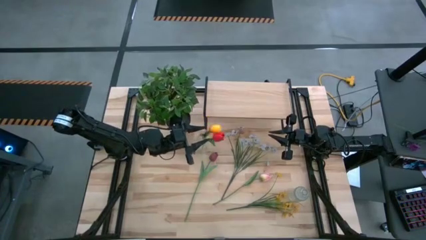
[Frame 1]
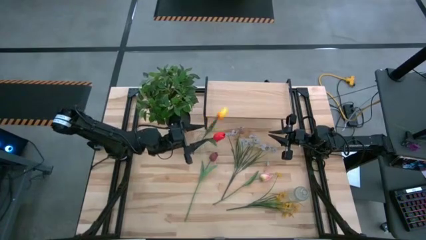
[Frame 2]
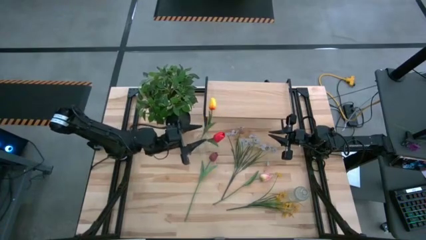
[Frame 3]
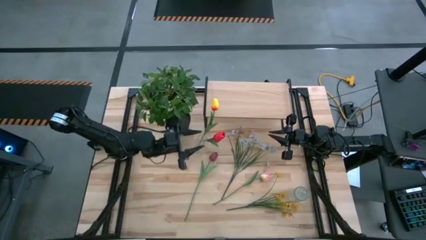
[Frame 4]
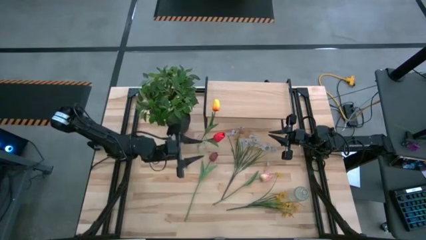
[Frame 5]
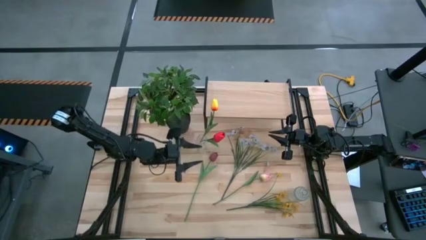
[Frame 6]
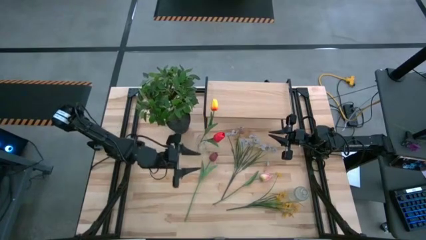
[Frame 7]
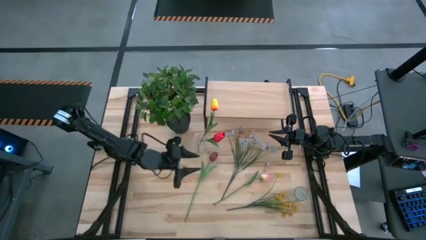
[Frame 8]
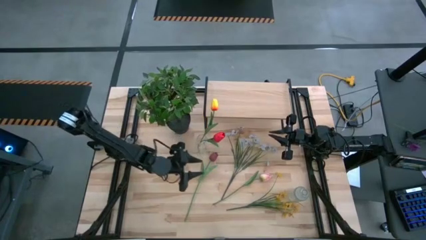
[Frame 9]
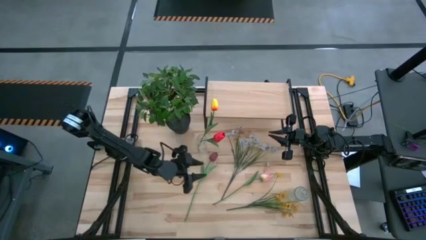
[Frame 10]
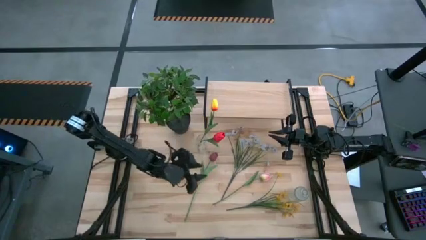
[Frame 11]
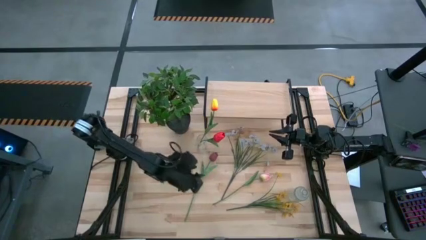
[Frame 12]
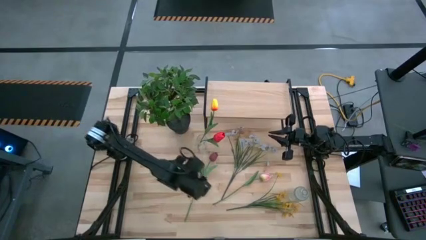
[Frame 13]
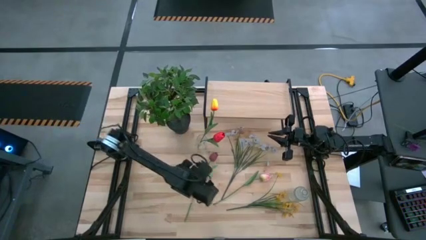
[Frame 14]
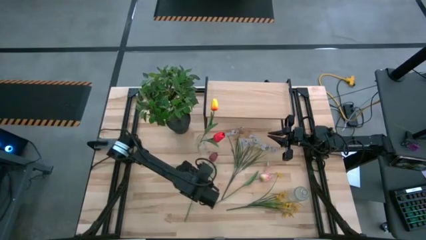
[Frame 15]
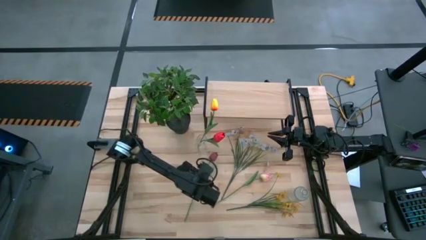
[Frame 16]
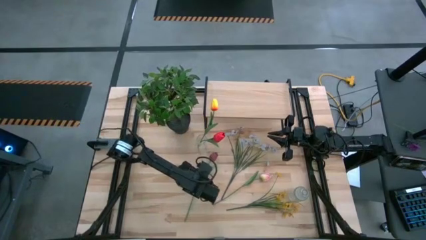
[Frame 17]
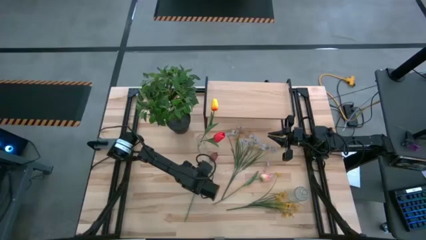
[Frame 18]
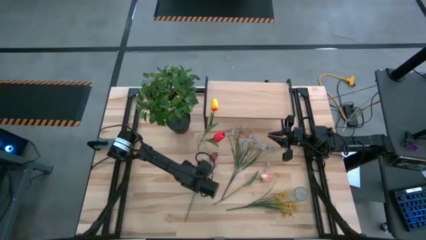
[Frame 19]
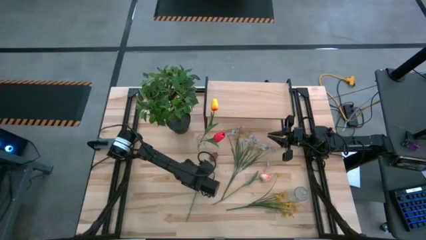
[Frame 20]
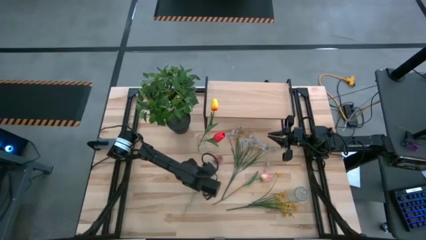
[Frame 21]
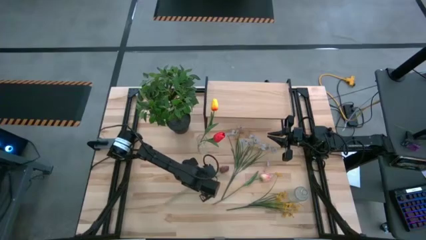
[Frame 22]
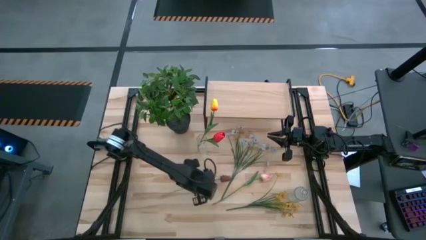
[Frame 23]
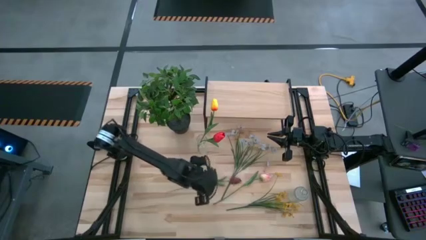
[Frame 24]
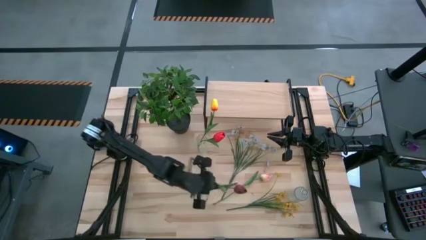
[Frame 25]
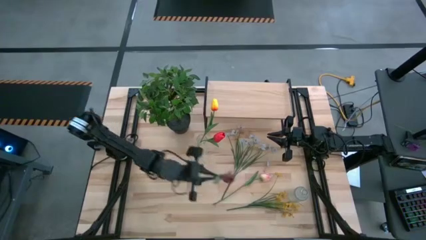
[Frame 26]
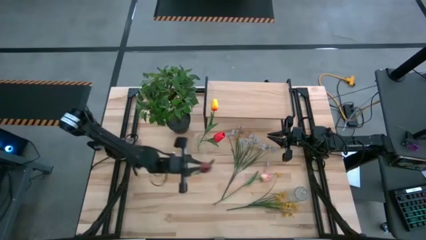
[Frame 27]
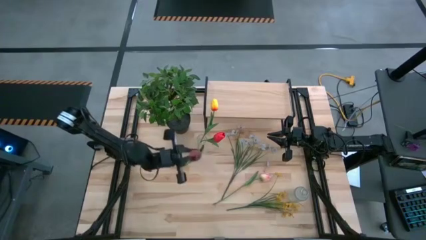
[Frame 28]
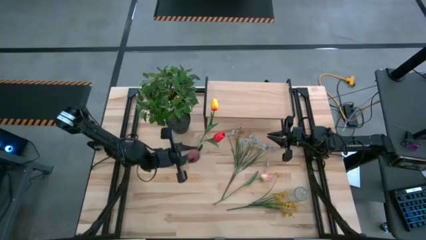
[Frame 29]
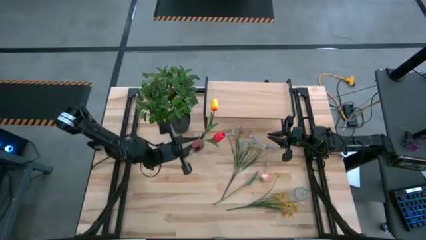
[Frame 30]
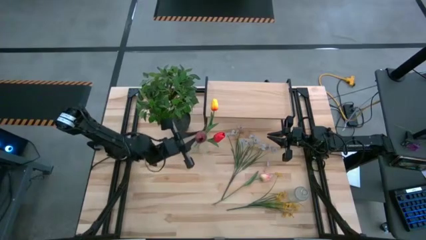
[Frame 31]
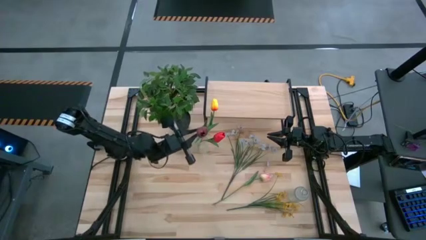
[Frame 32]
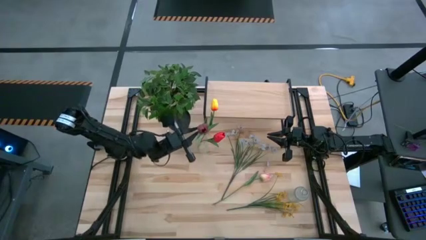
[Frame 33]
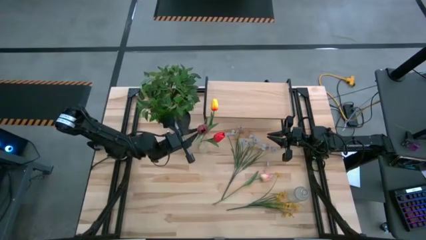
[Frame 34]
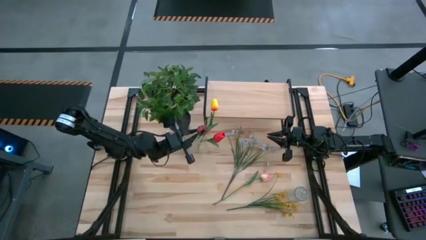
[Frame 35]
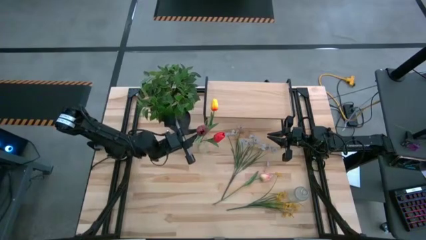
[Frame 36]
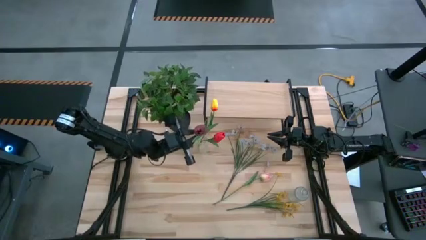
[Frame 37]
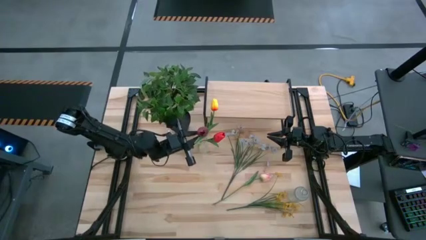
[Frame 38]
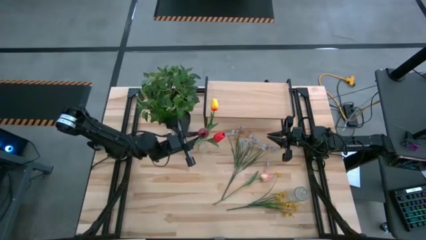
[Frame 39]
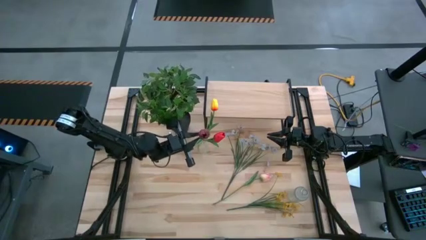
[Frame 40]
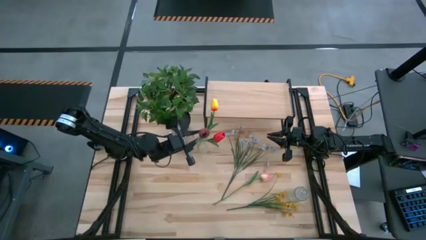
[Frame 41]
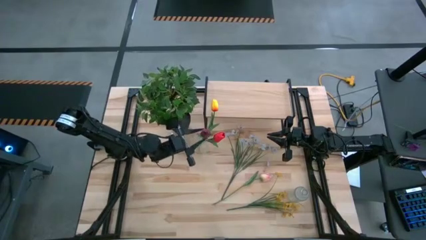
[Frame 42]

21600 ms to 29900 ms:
Task: Pick and place flowers into a vace then onto a shelf
Put the dark red flower into the top transparent vase

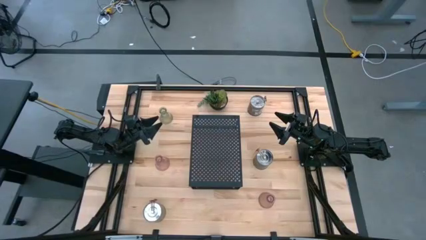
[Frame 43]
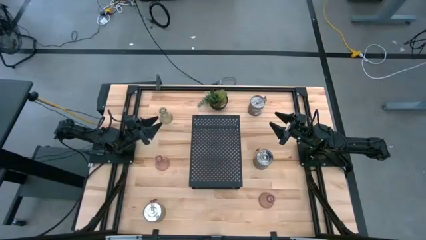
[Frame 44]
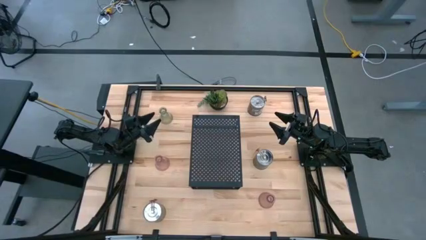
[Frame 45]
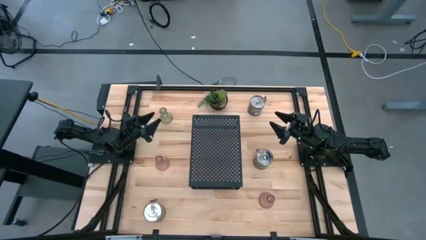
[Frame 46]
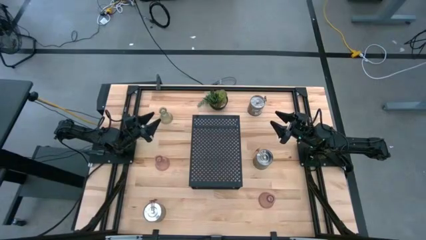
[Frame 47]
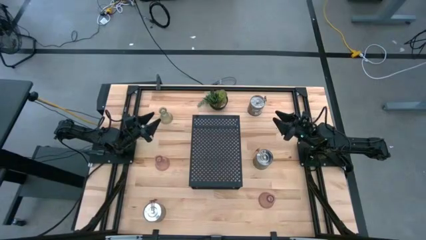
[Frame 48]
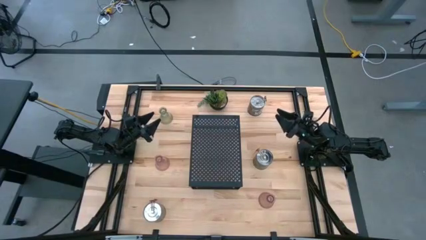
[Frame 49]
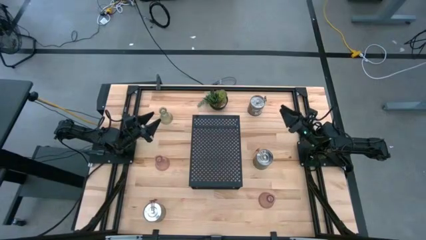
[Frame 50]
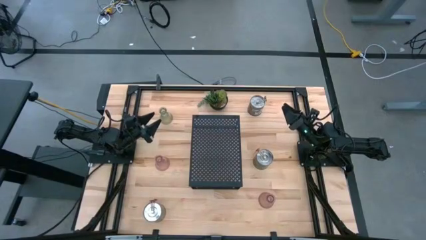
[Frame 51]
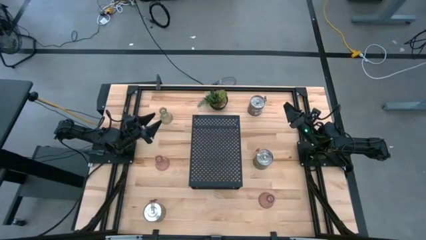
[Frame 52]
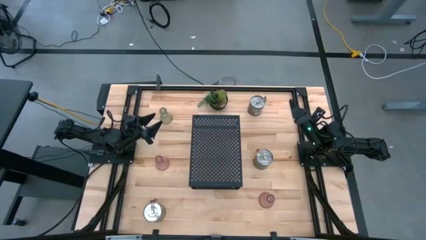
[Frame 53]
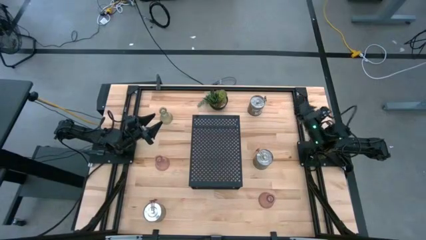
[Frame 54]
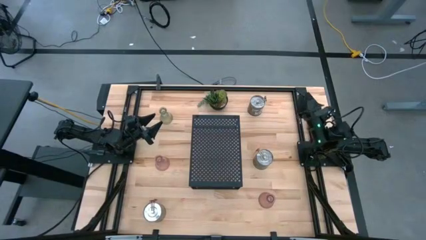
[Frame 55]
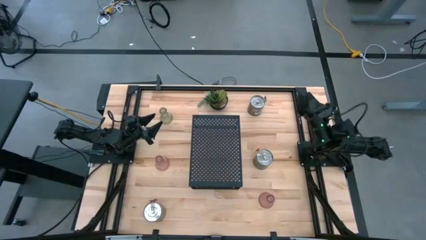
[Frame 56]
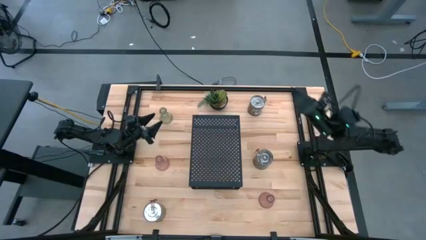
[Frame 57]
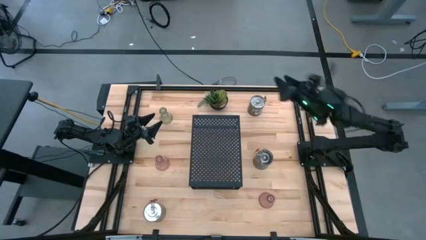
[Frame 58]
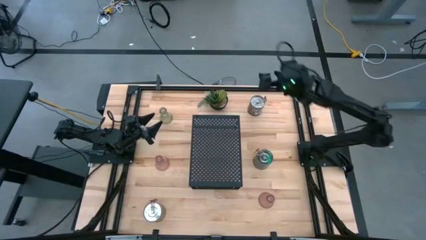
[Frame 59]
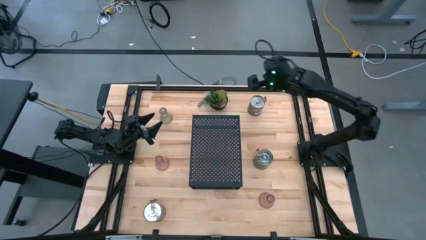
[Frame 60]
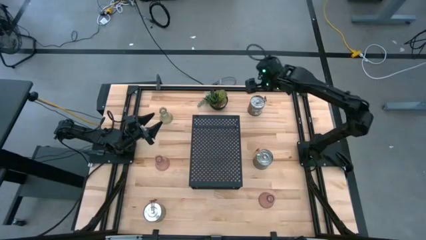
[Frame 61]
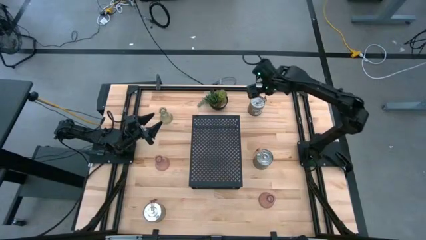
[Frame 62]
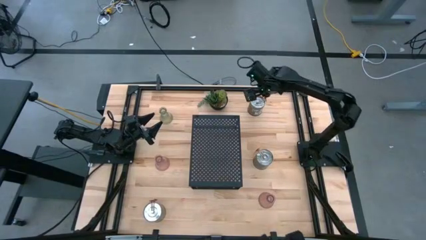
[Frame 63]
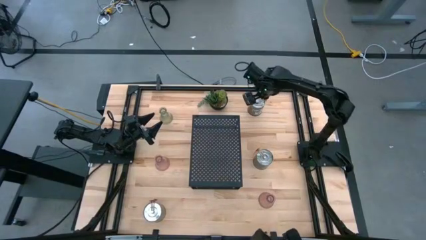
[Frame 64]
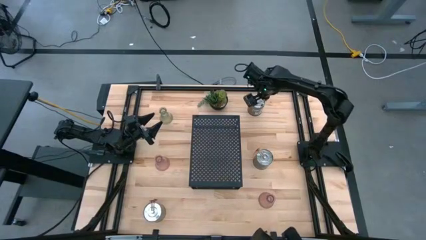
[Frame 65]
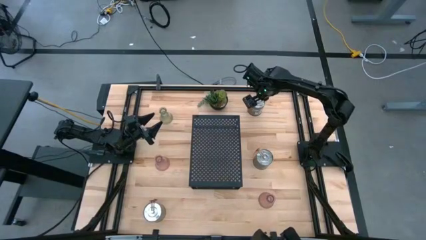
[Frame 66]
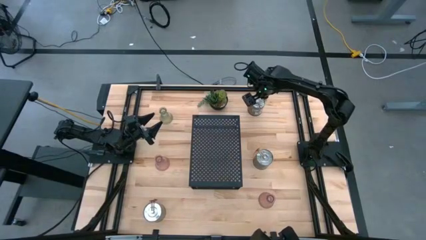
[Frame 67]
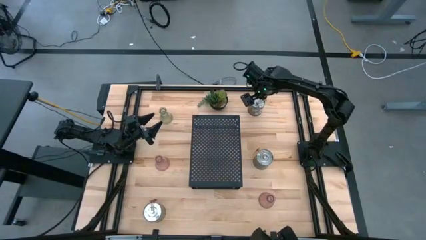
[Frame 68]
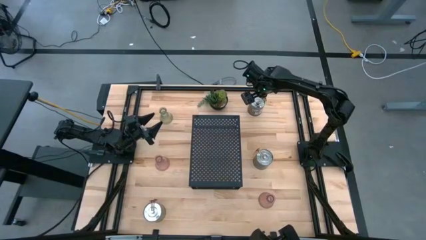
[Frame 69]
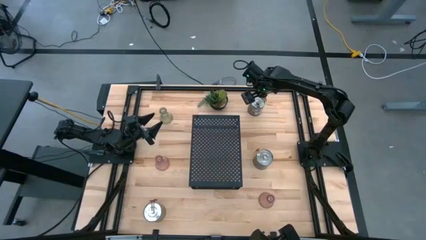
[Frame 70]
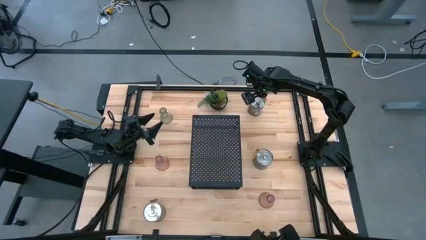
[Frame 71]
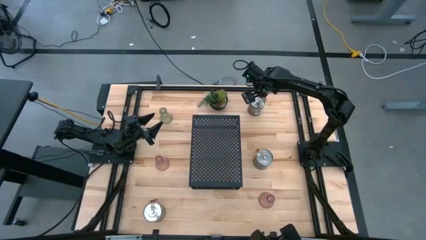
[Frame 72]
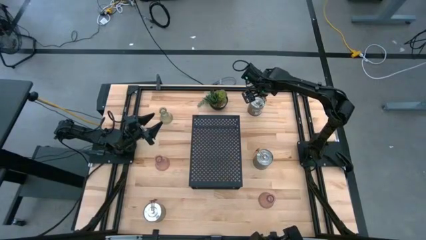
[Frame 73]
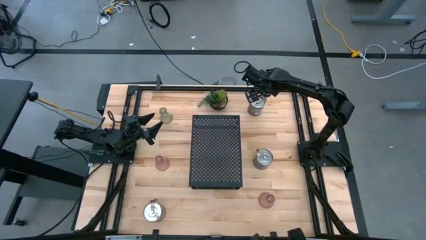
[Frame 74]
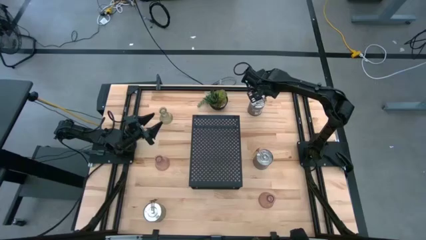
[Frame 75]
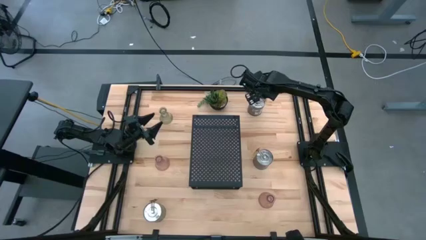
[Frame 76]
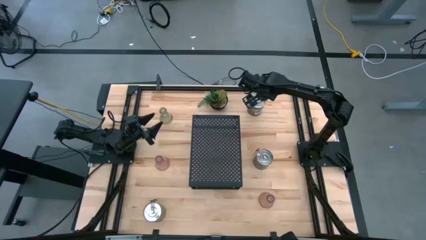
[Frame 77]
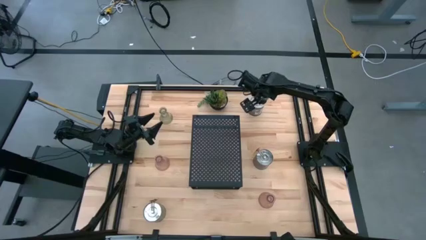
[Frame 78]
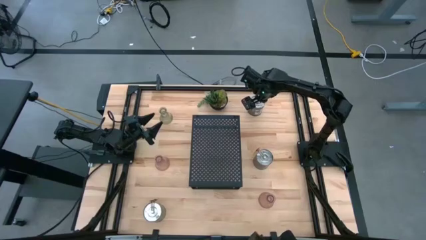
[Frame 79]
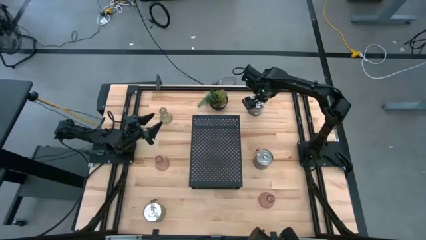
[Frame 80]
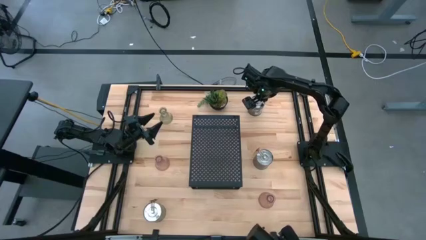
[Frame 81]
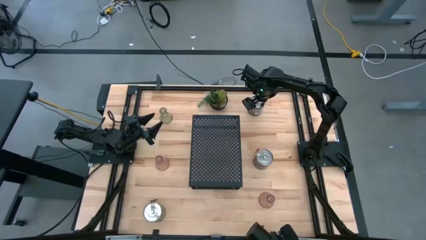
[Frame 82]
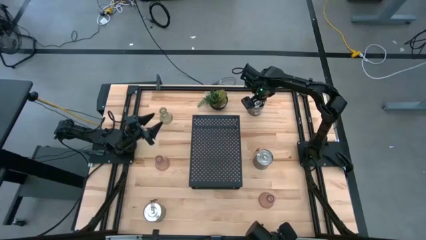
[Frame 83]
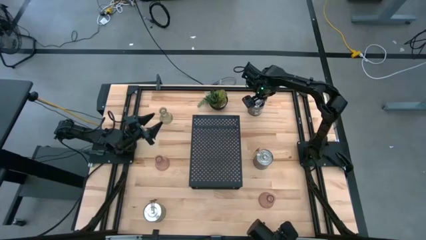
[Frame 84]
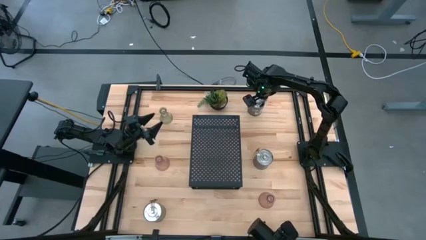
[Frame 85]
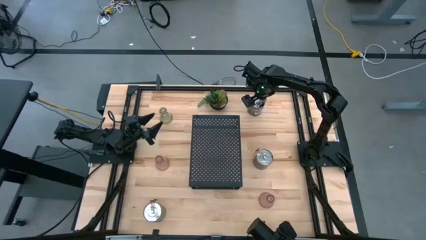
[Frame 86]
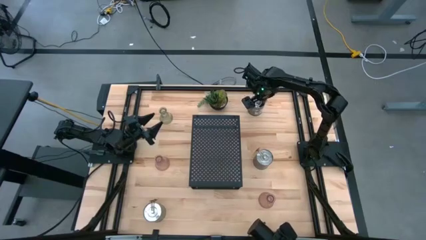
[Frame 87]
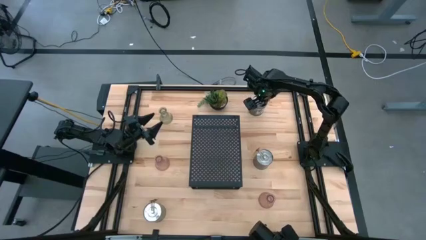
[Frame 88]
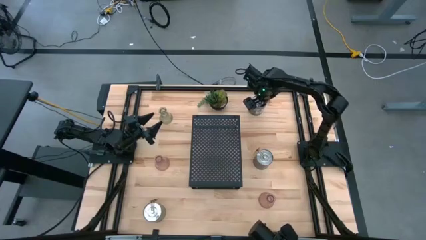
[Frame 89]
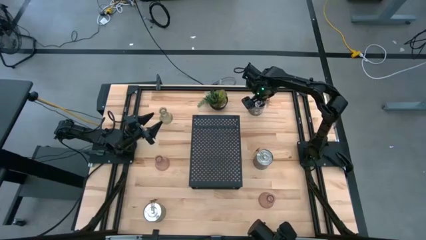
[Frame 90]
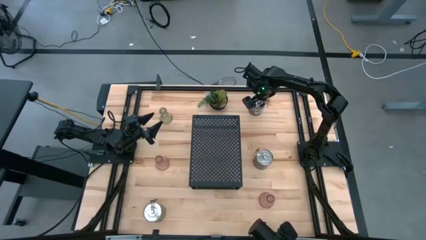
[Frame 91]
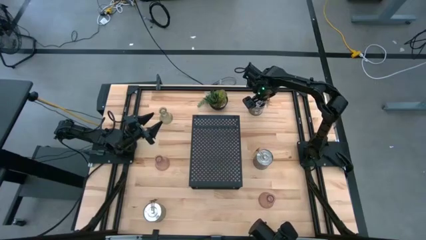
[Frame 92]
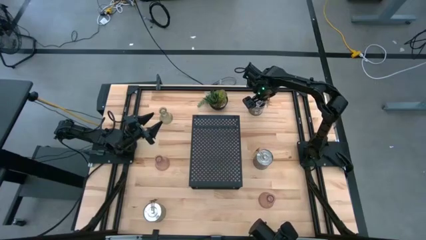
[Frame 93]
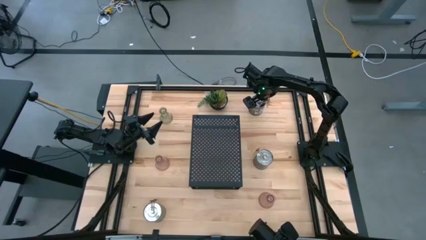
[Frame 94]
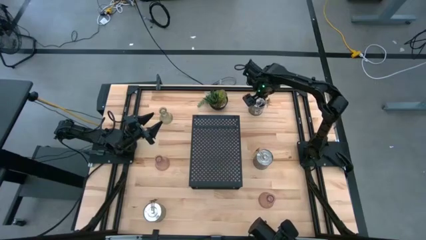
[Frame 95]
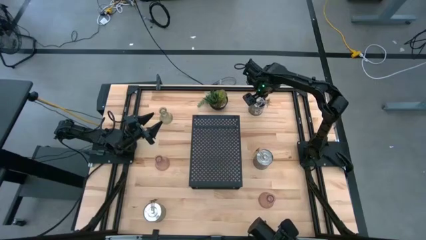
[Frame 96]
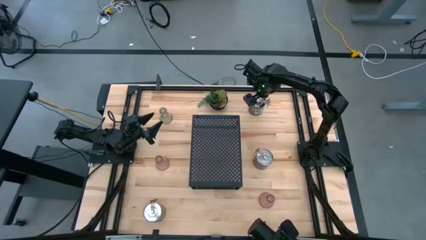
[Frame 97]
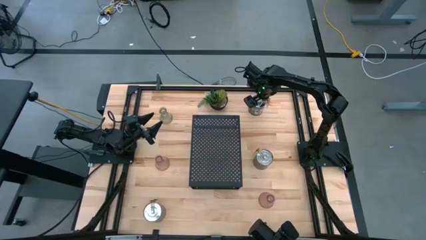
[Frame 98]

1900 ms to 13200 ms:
Task: Pick & Place candle stick holders
Put the top scented candle can on the shelf
